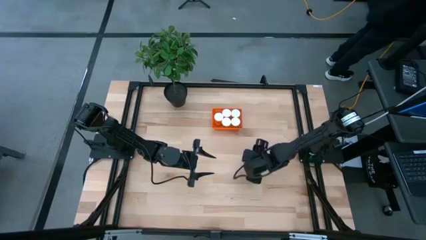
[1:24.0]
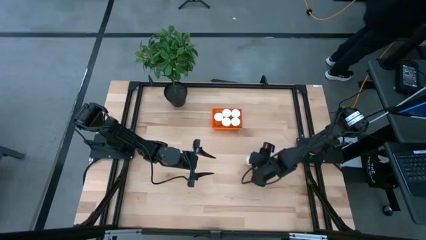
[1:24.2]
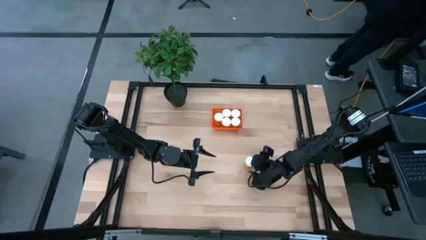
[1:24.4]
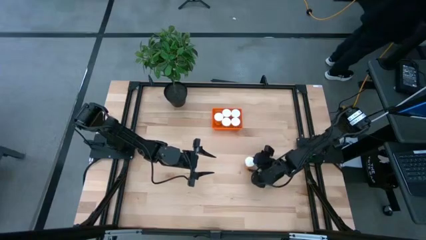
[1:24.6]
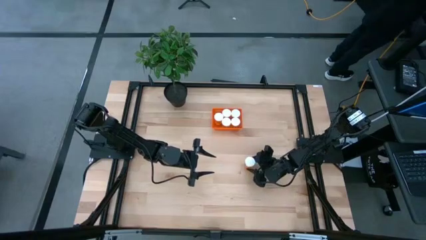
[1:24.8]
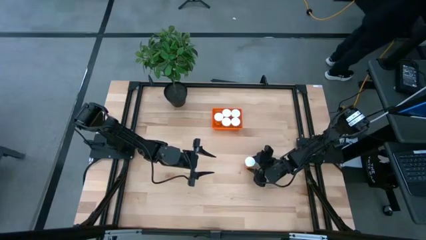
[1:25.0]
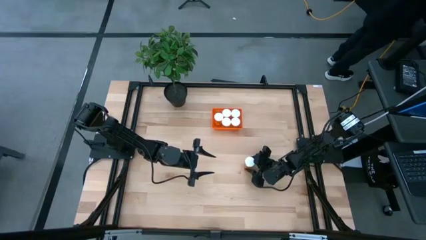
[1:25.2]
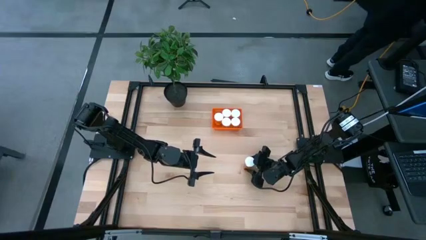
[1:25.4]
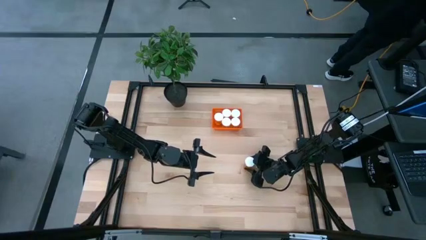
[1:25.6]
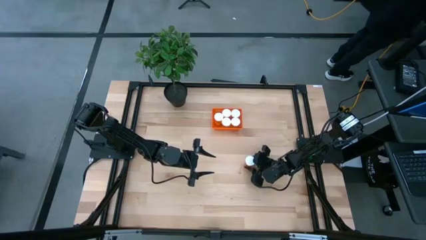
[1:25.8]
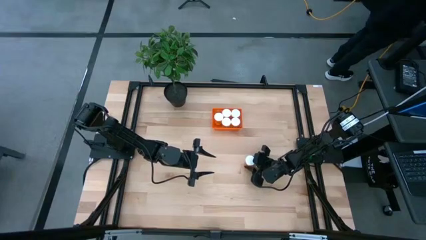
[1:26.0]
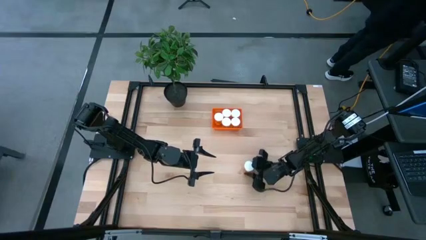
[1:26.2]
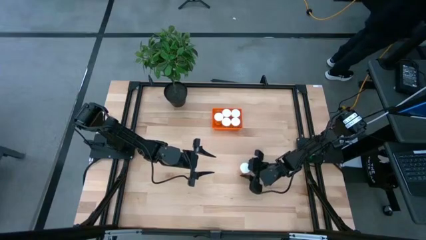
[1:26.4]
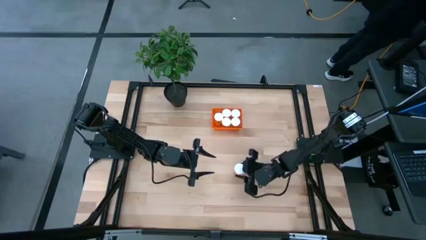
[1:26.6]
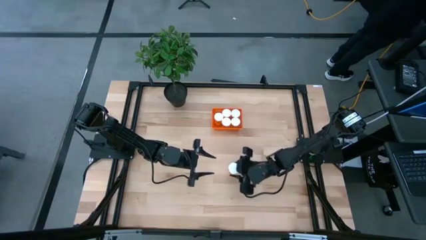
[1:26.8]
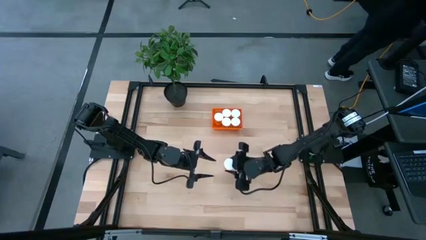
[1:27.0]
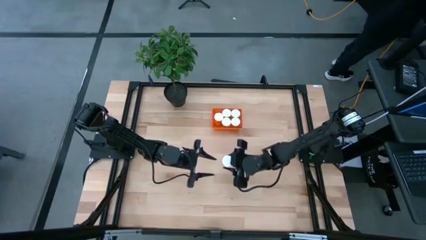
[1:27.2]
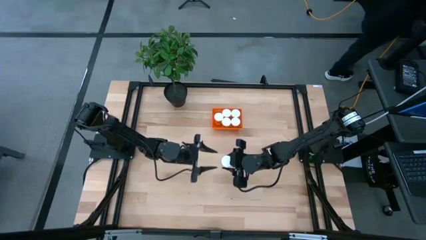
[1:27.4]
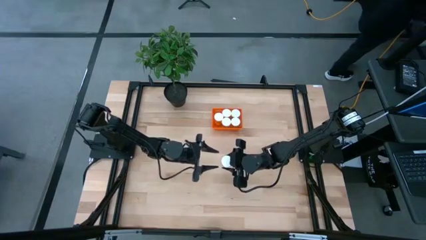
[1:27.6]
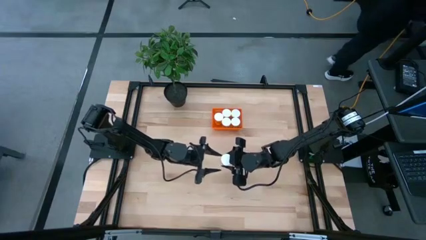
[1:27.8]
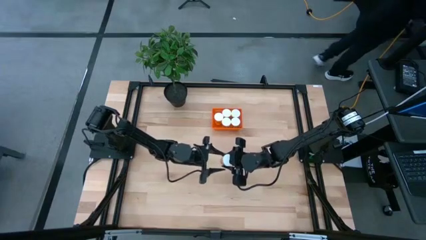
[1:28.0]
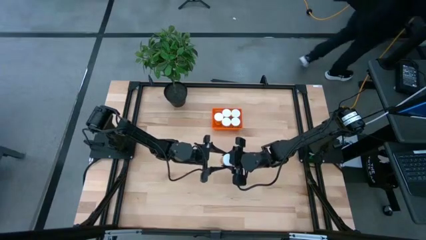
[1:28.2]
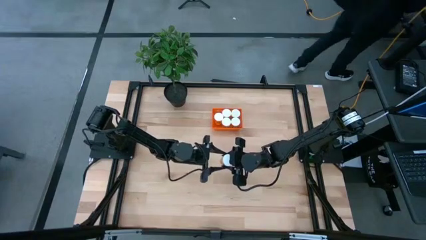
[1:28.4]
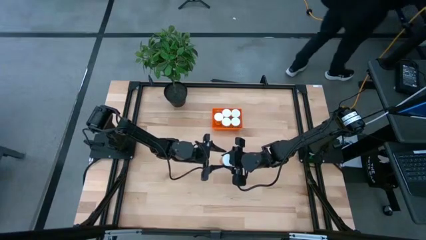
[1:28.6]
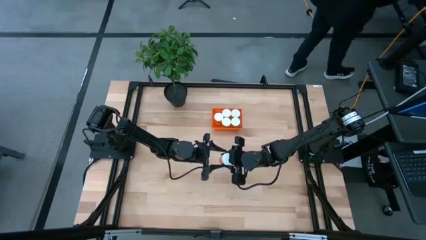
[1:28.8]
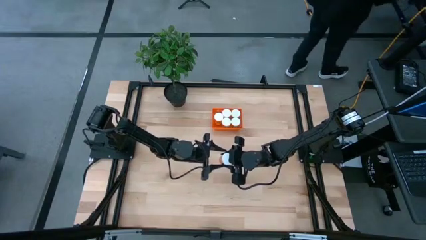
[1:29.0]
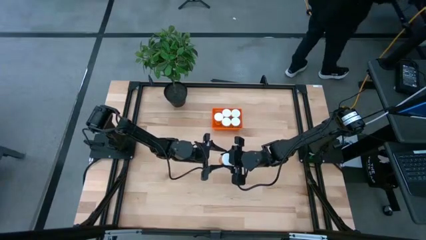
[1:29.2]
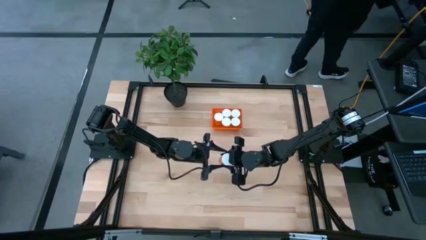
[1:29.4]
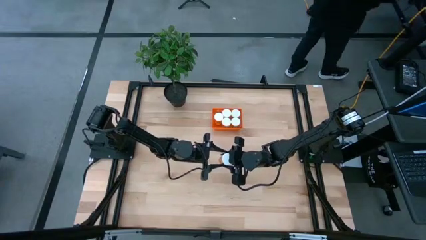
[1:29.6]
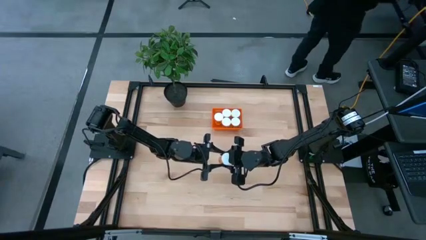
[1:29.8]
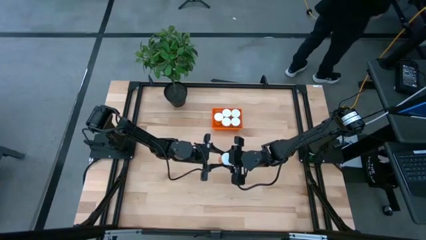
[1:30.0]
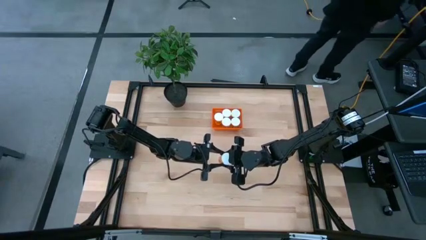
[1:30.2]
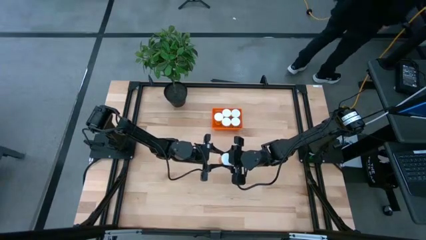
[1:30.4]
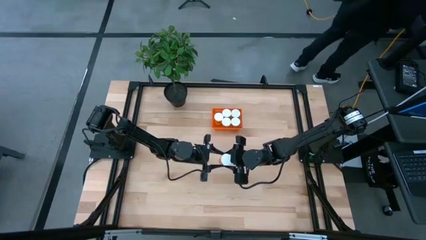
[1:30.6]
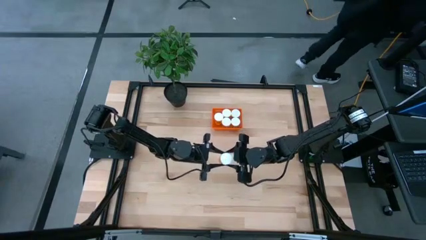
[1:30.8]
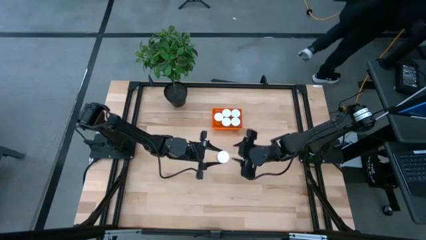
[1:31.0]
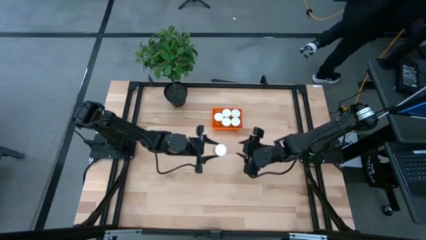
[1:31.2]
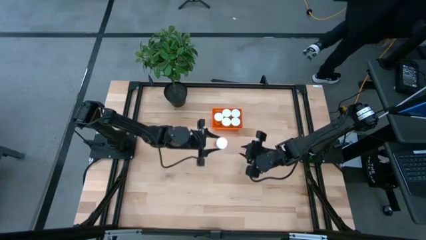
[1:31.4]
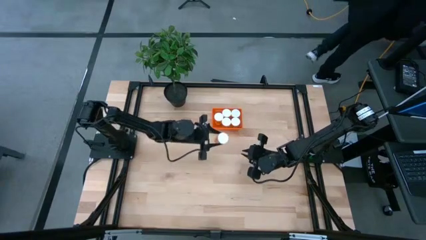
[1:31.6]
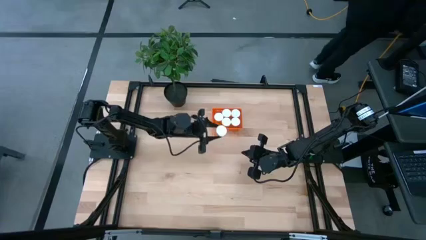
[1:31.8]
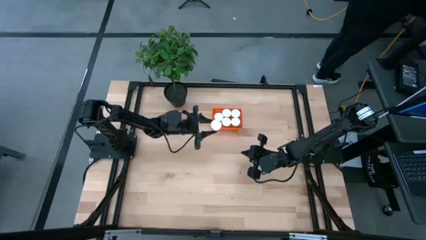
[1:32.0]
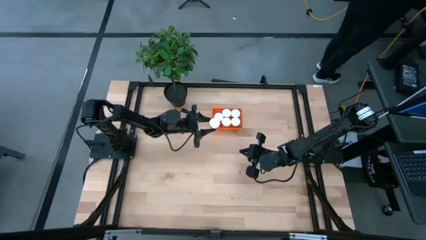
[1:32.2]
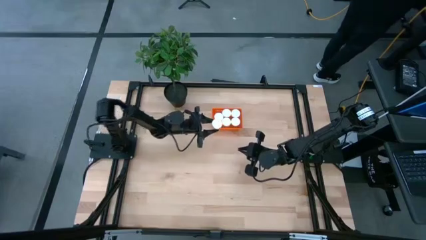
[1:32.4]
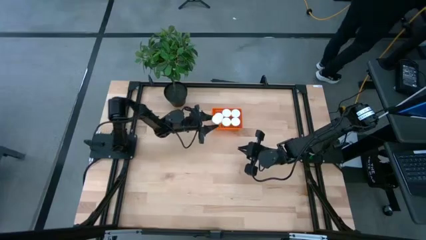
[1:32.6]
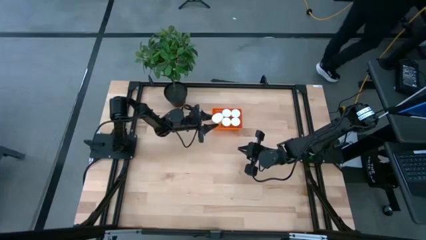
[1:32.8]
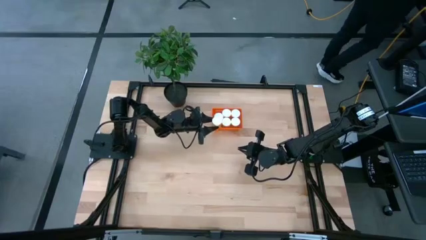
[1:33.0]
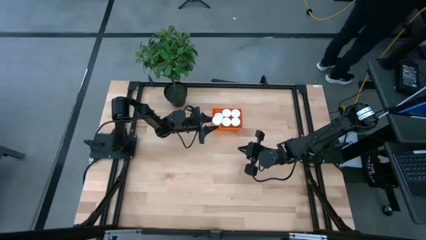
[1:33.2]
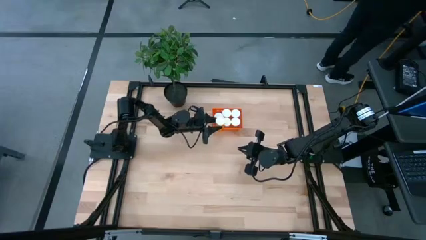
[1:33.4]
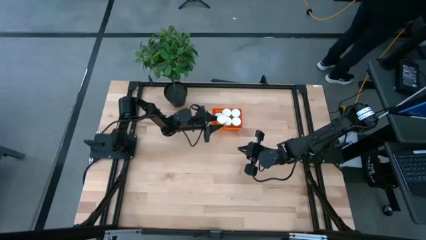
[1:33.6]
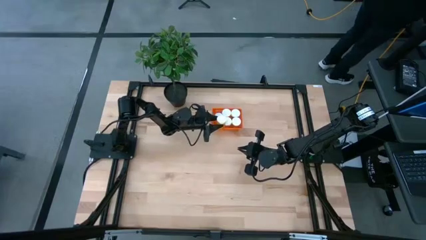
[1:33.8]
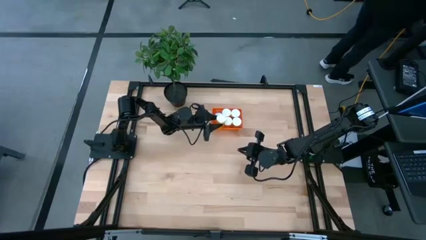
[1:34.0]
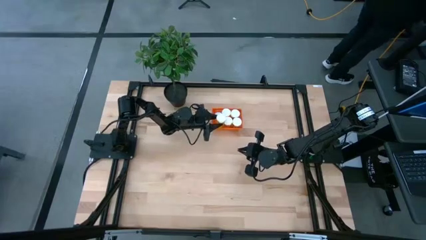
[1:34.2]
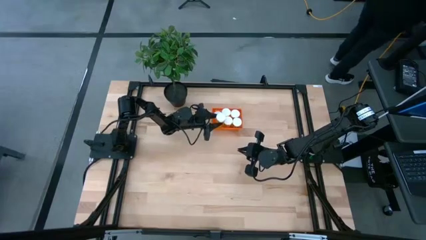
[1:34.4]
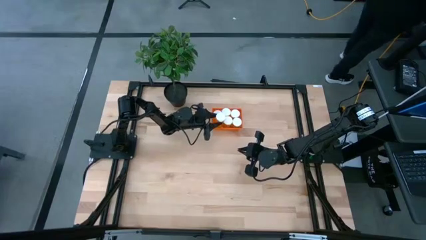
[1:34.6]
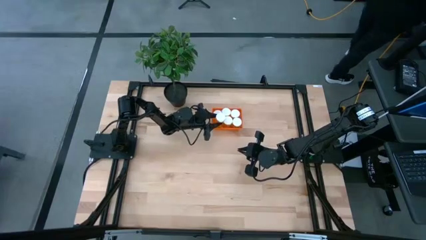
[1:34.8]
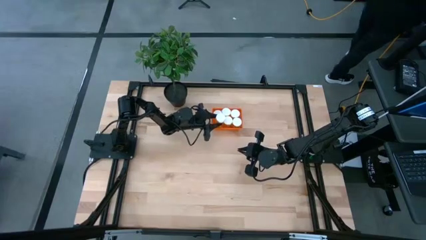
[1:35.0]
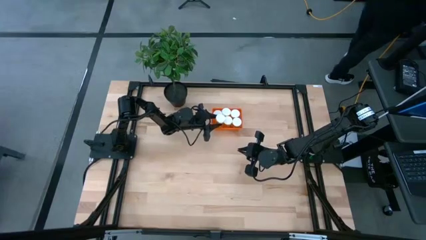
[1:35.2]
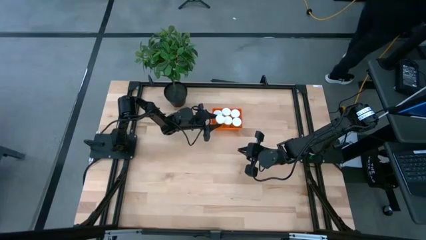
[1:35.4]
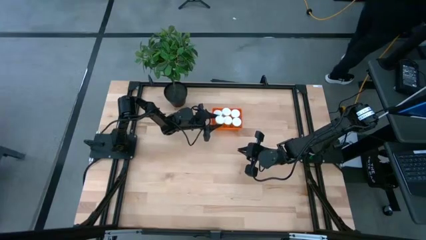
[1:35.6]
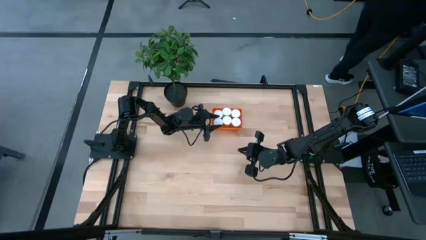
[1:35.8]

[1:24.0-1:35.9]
Task: Pick and place pill bottles into a basket
Put the orange pill bottle into the orange bin

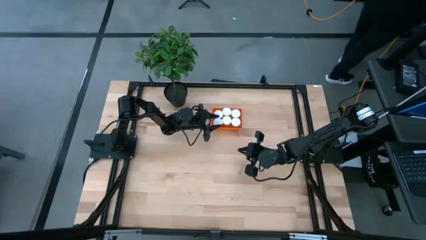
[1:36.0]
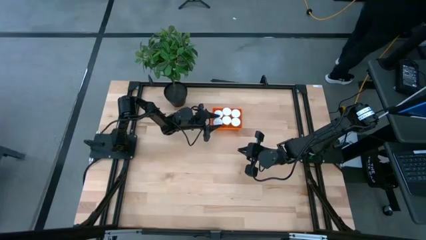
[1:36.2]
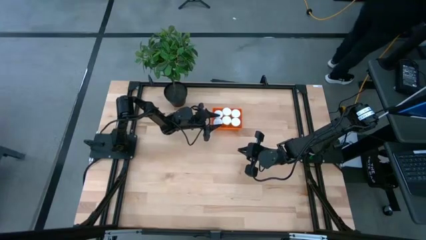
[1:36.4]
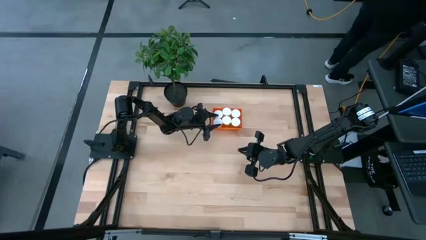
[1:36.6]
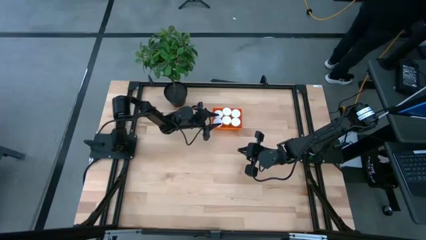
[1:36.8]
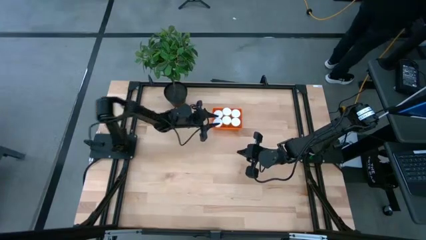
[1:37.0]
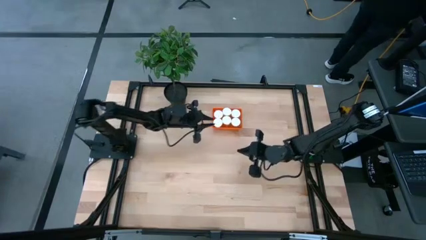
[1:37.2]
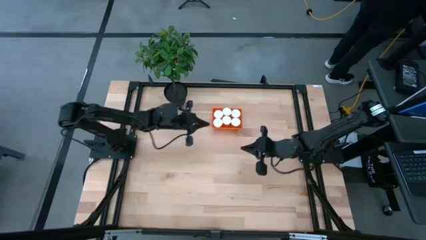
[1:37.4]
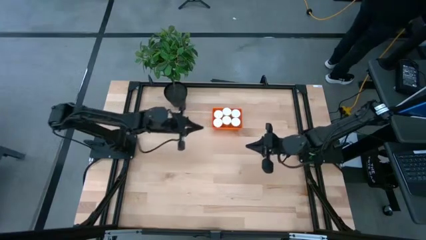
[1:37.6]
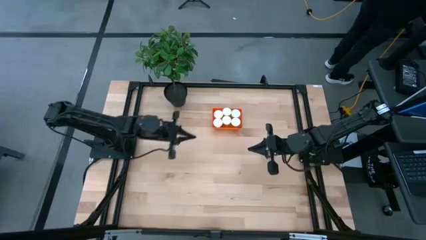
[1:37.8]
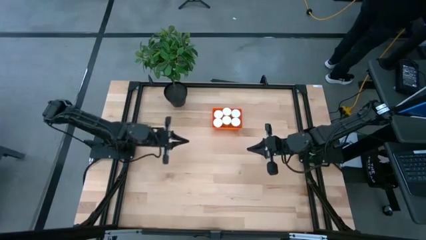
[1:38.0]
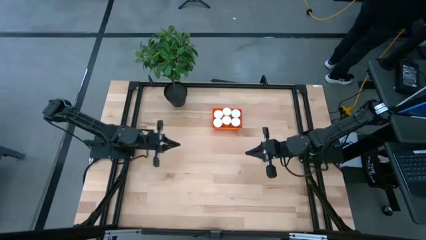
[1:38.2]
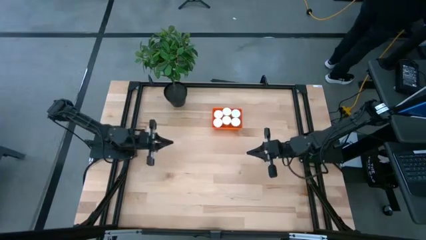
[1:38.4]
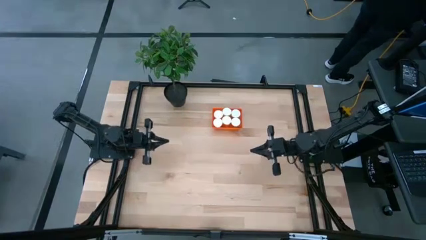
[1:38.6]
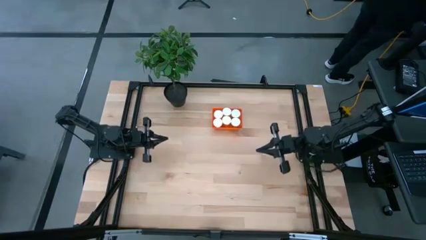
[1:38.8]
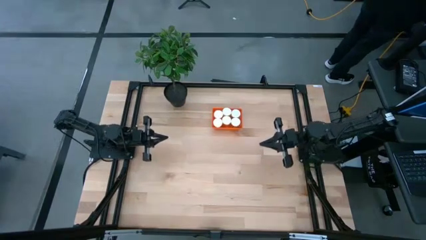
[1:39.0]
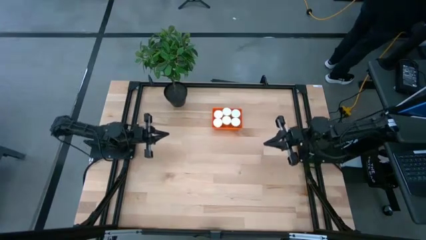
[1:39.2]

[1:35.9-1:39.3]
Return to Home Position
